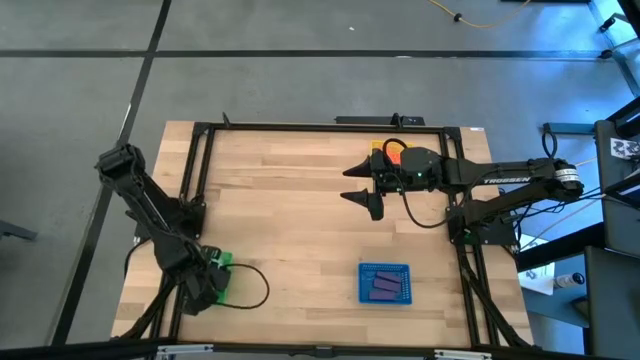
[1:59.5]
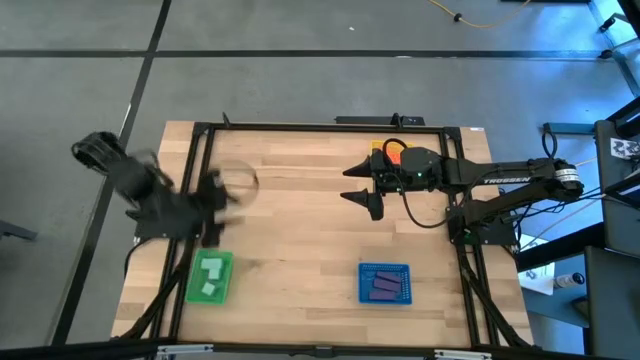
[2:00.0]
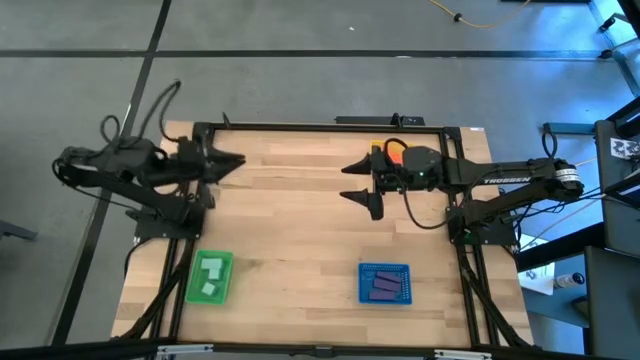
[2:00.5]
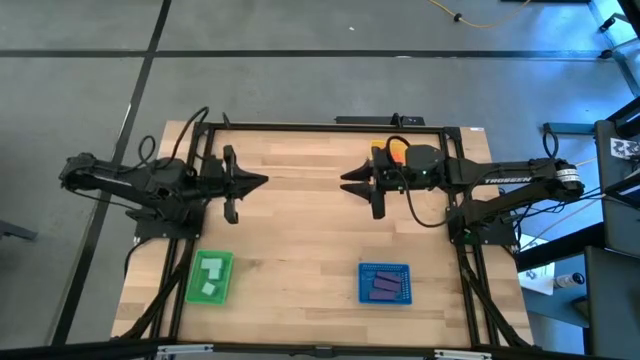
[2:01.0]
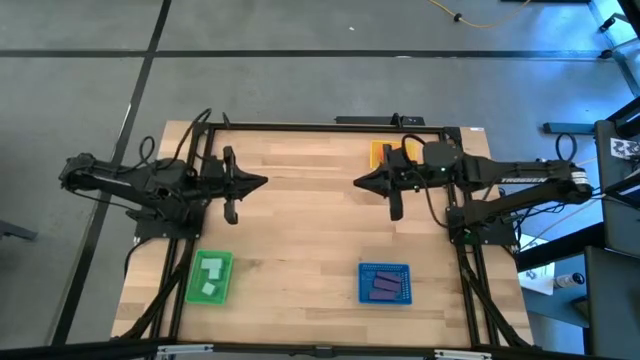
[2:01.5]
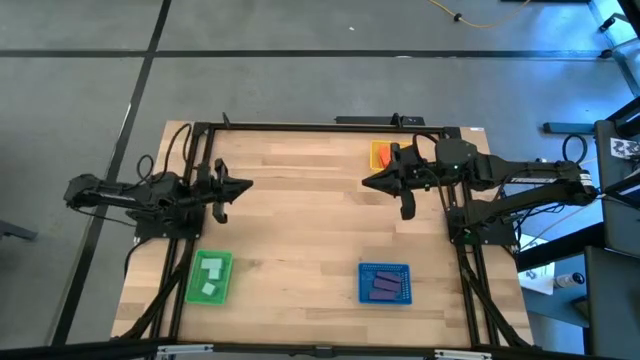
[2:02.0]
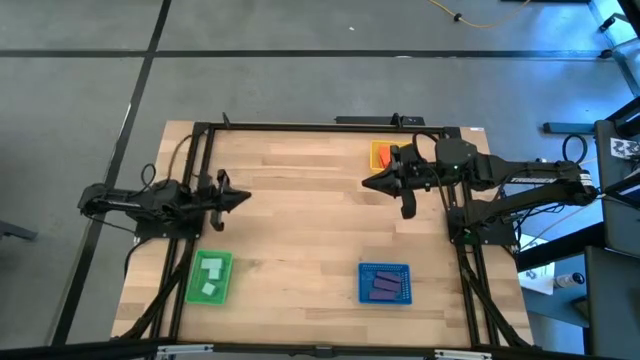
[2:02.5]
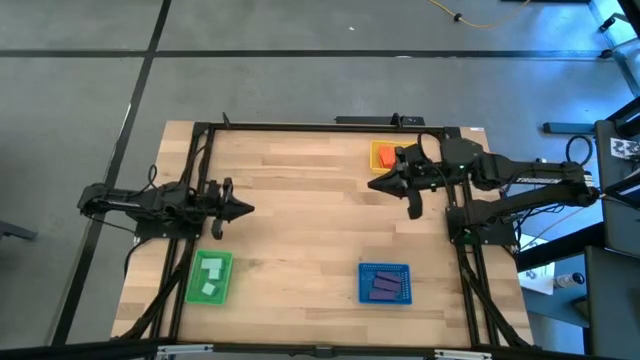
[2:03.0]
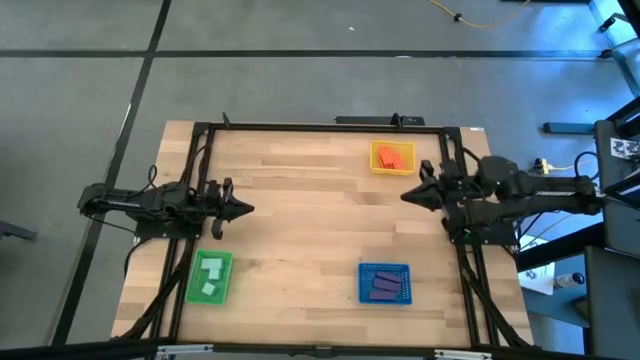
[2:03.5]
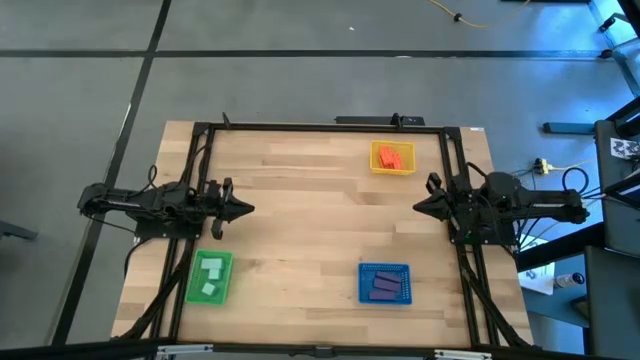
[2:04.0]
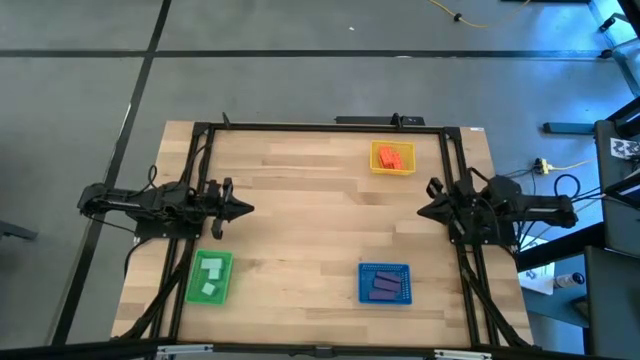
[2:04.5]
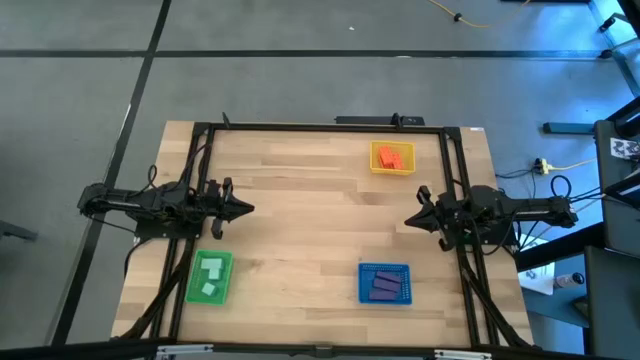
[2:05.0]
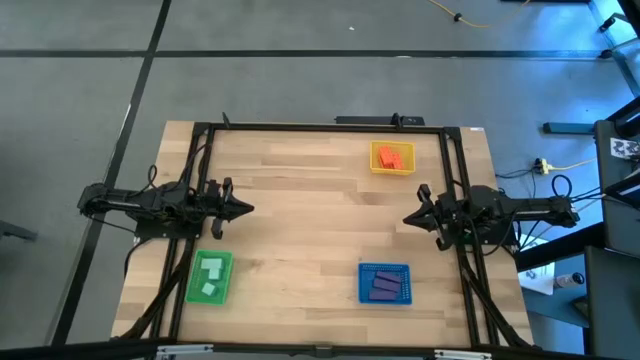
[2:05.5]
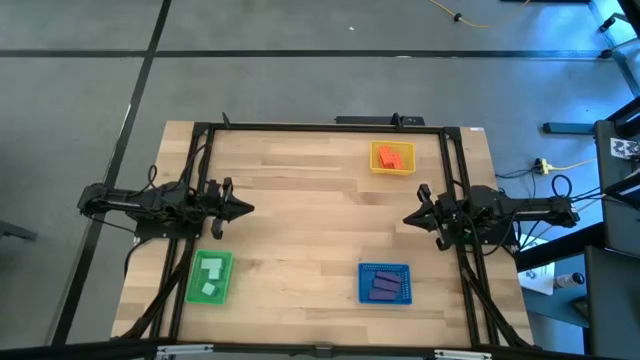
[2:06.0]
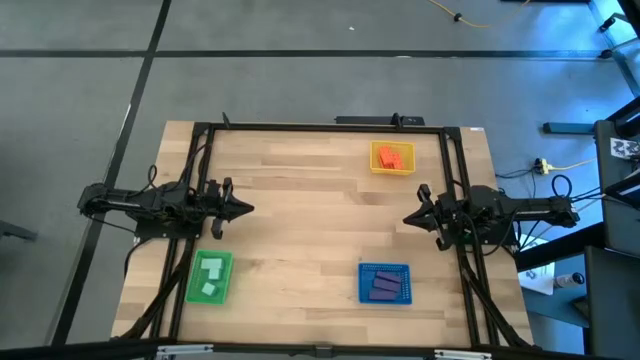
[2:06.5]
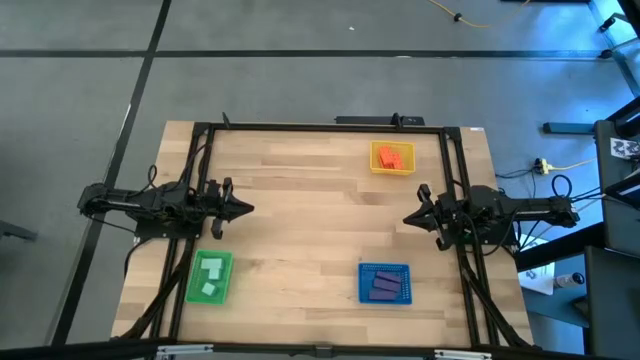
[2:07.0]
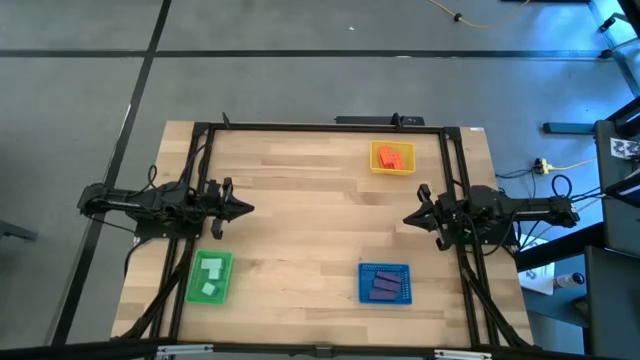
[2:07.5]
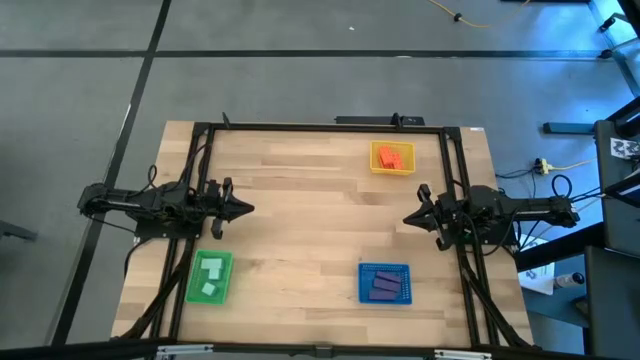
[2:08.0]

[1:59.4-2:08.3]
Task: Sort & place blocks by color
Return to Home Position

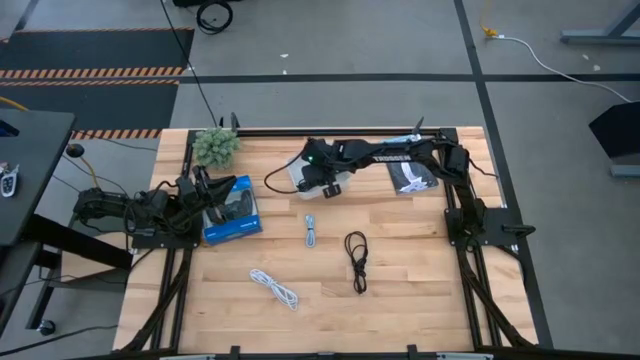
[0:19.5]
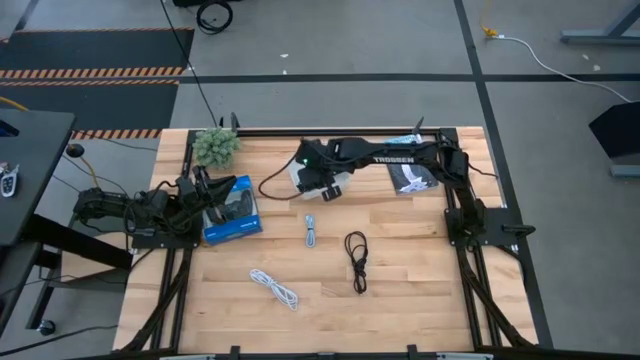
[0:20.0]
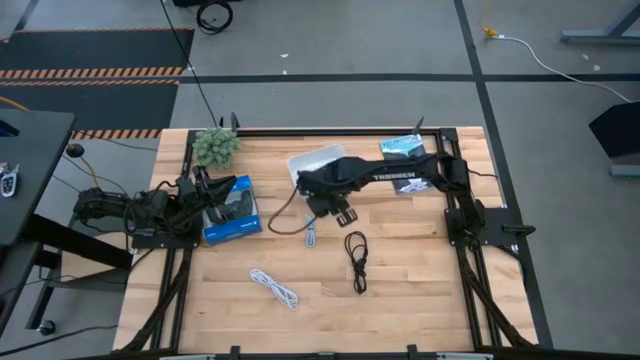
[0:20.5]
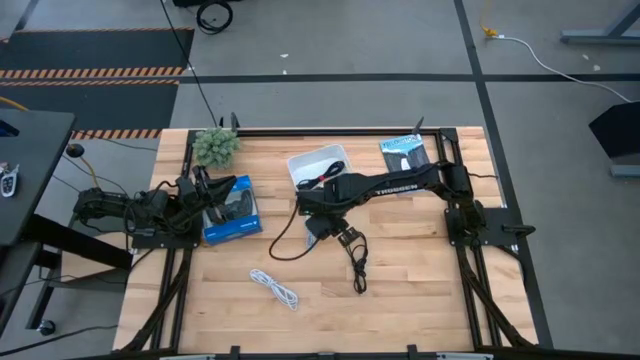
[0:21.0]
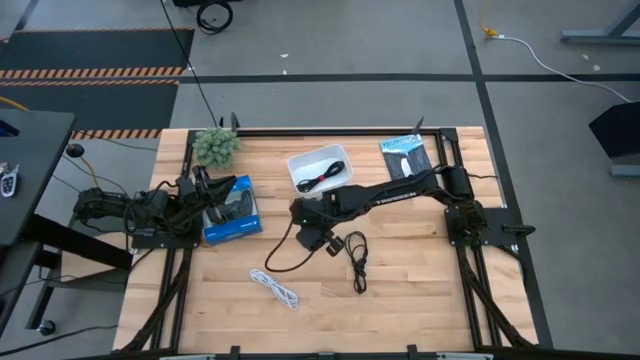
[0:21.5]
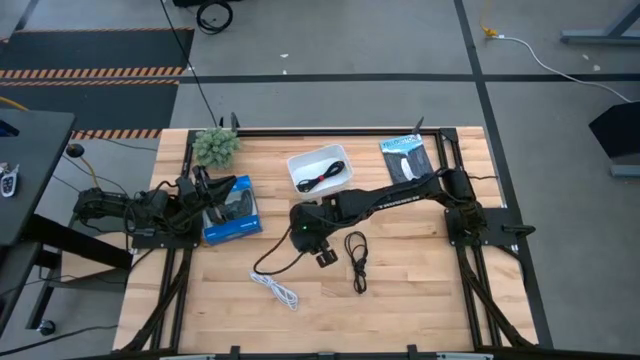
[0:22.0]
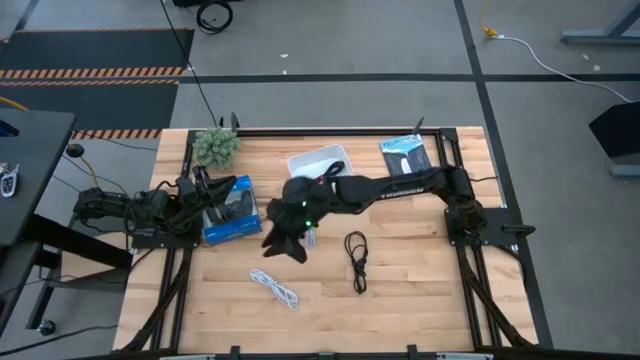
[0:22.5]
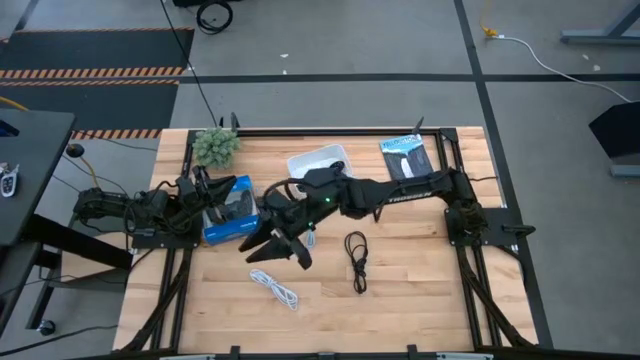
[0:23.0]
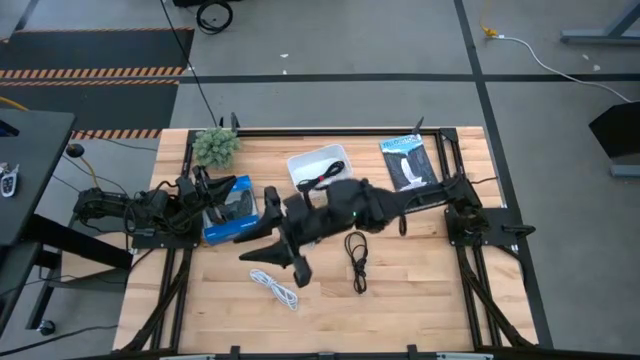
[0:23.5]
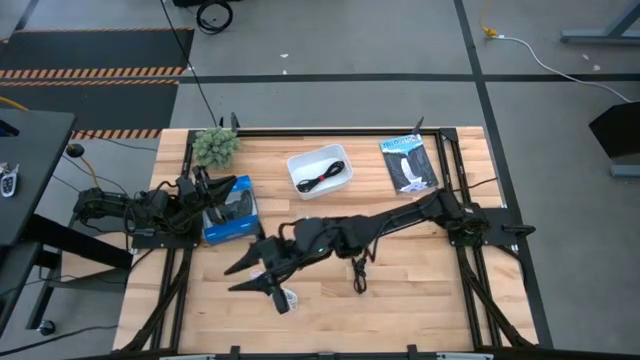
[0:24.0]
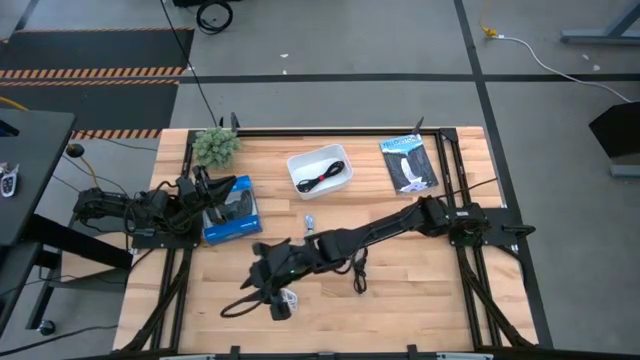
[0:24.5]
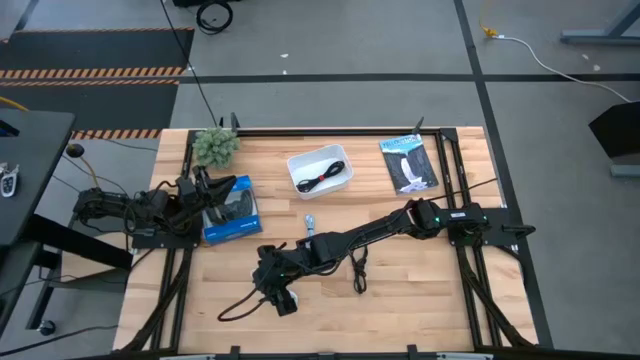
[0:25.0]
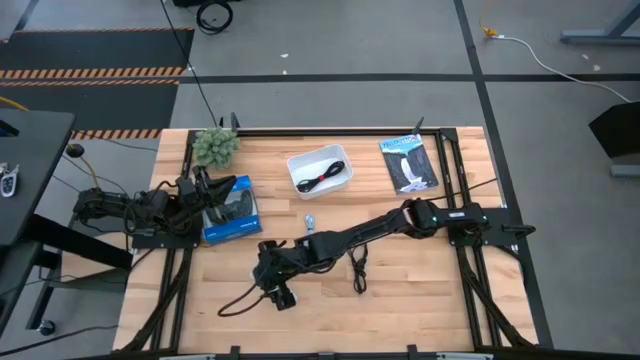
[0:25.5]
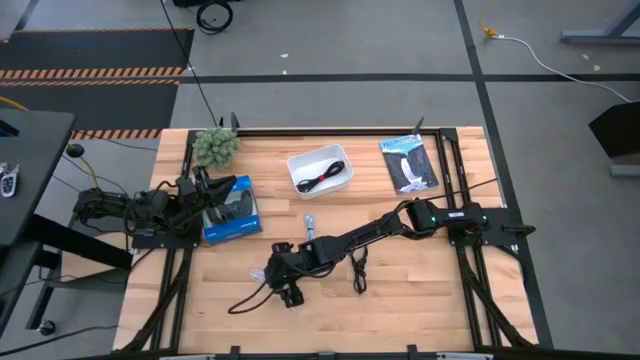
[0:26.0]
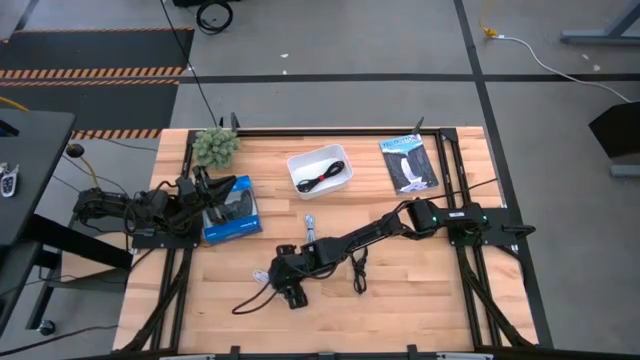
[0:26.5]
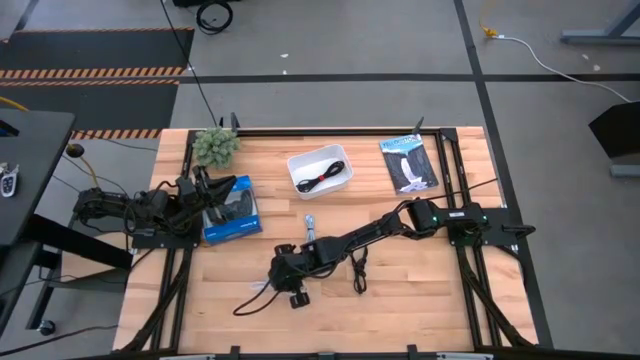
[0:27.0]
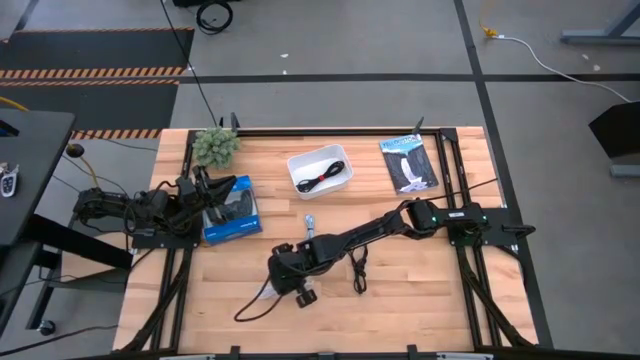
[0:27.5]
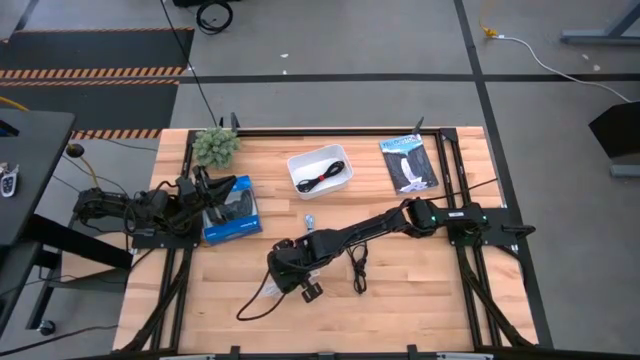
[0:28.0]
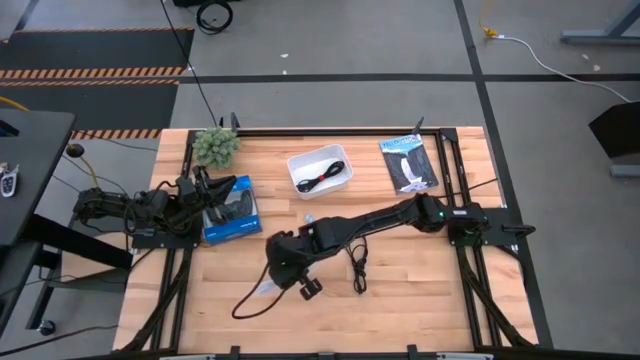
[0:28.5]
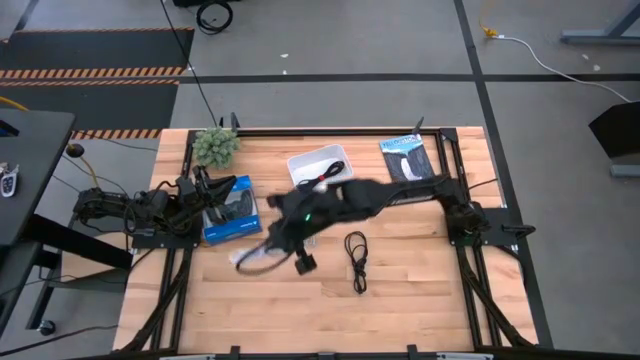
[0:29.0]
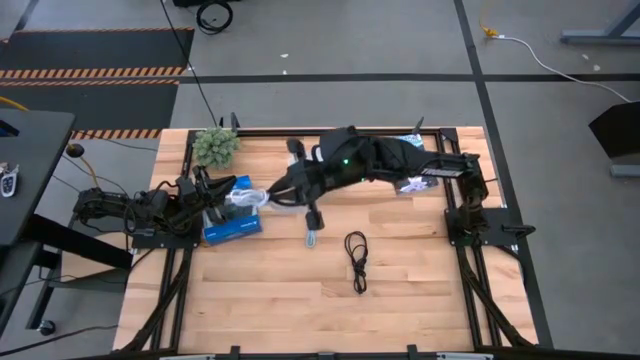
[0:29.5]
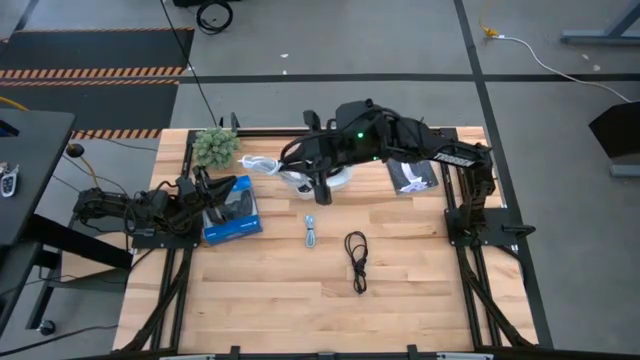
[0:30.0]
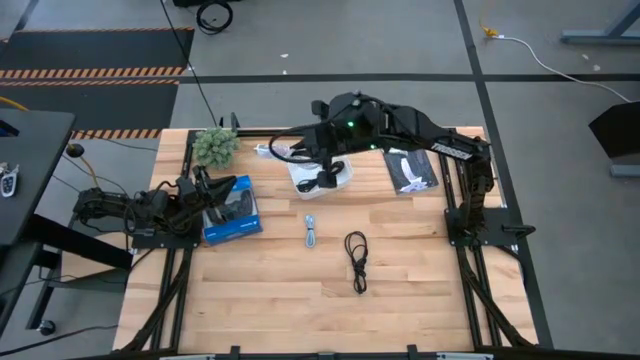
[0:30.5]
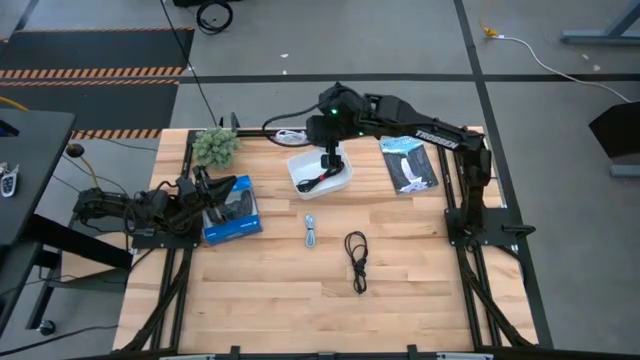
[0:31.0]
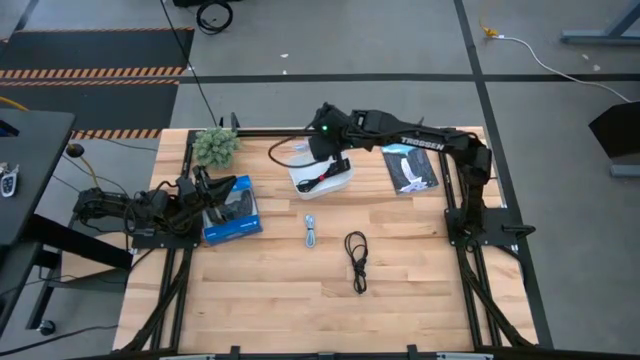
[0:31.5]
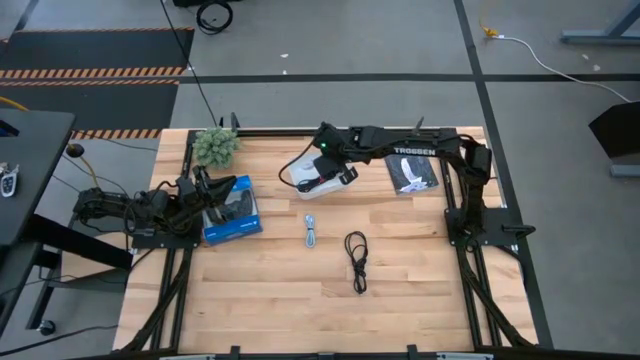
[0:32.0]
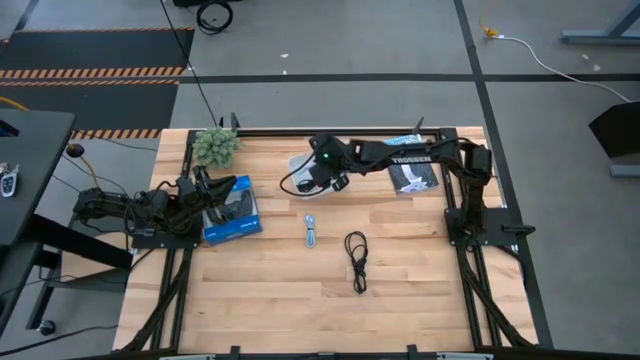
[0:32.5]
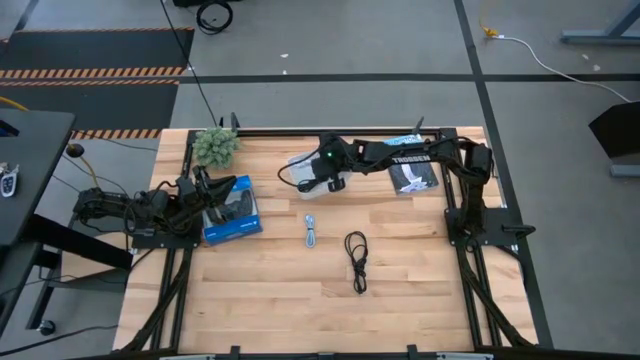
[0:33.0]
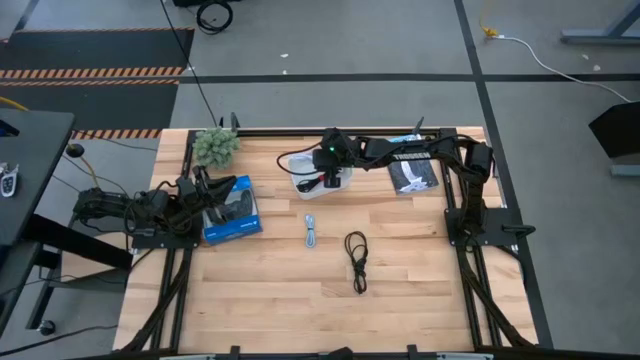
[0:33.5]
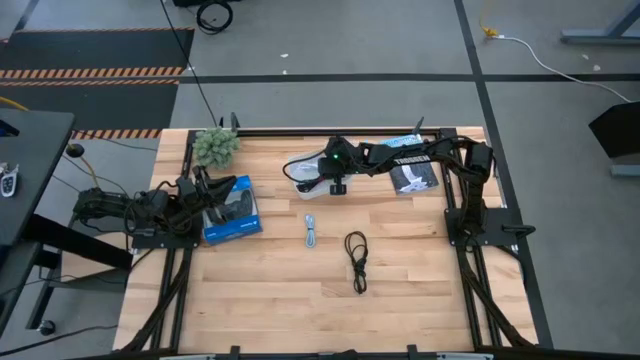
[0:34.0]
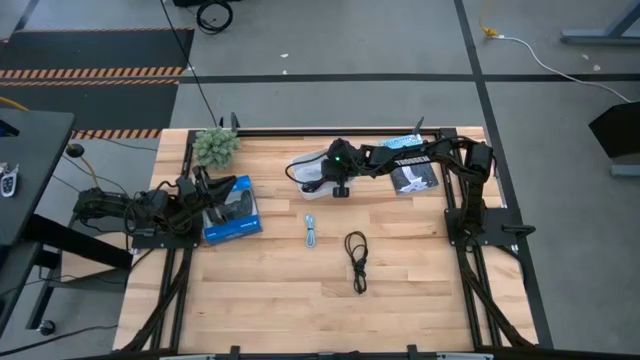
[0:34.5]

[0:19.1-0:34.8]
Task: Pick and place USB-C Cables
Put the white USB cable into the white bin
